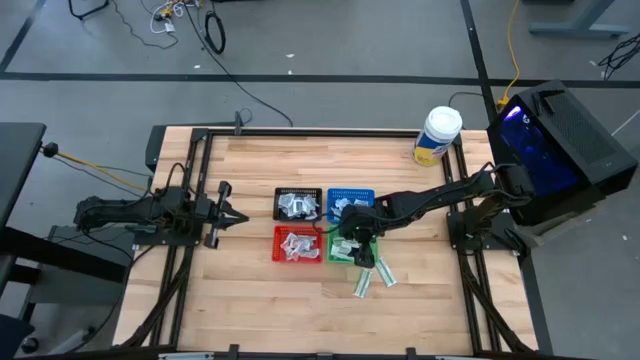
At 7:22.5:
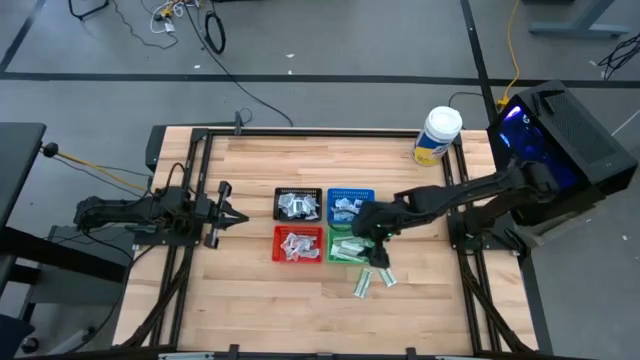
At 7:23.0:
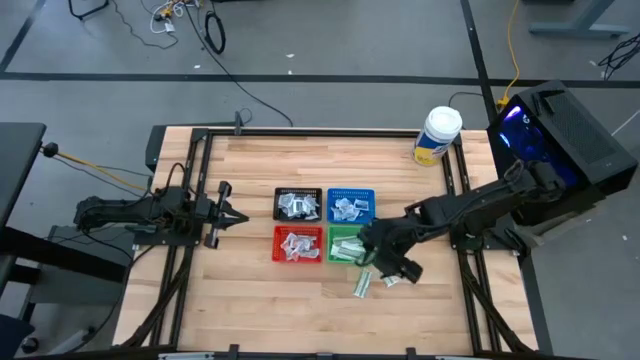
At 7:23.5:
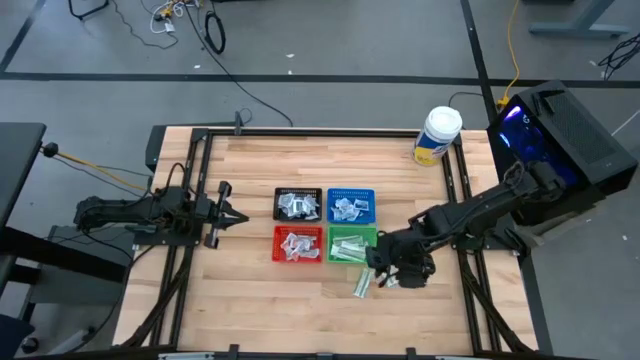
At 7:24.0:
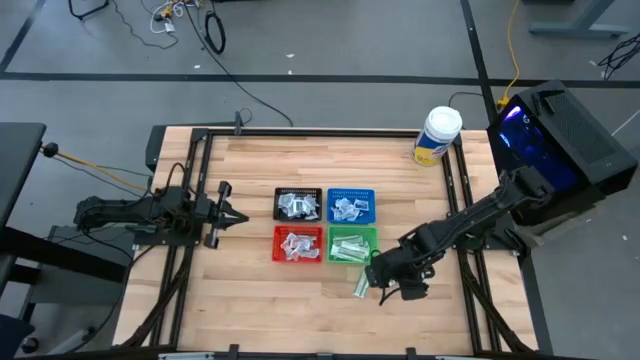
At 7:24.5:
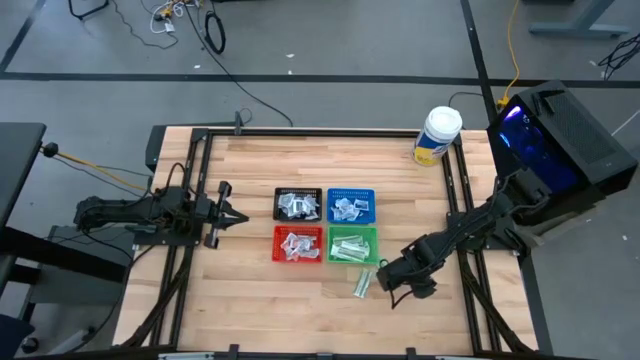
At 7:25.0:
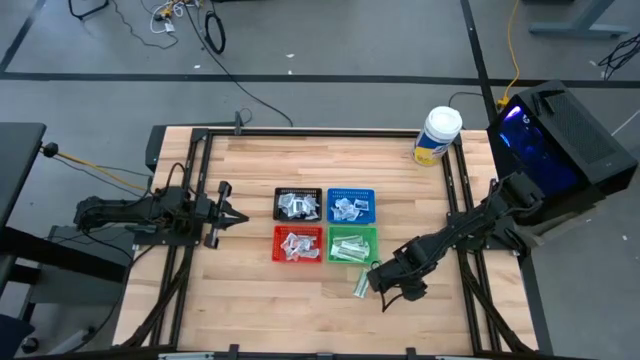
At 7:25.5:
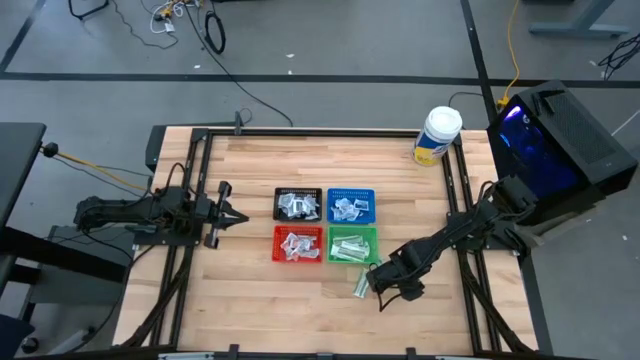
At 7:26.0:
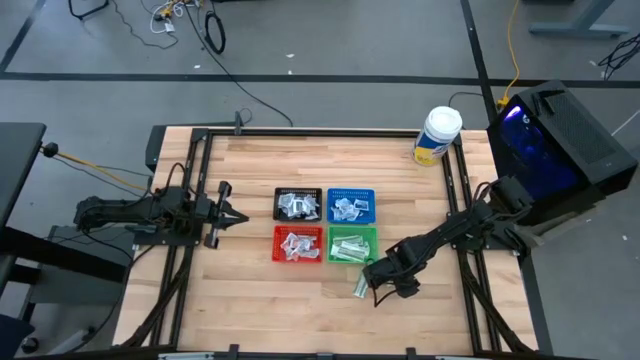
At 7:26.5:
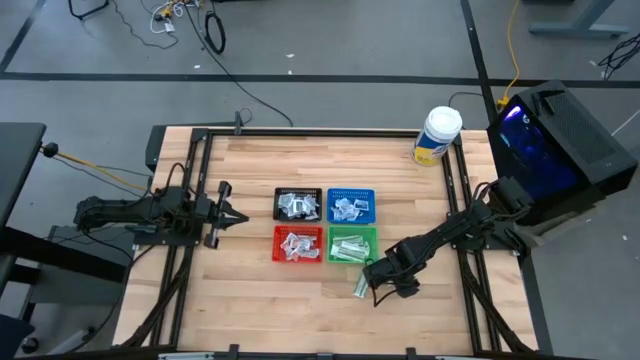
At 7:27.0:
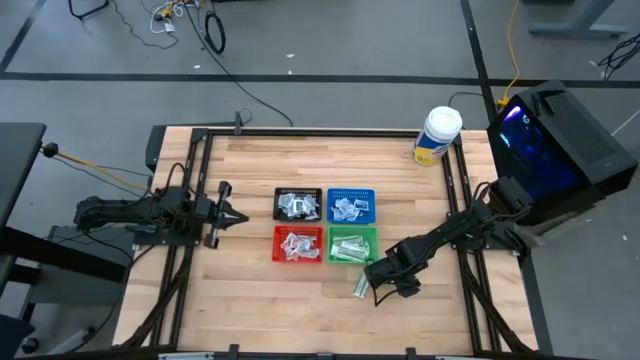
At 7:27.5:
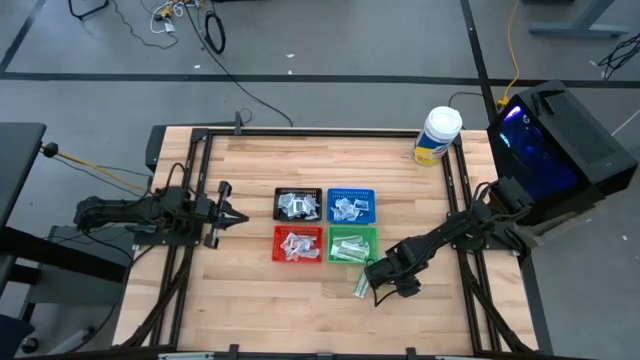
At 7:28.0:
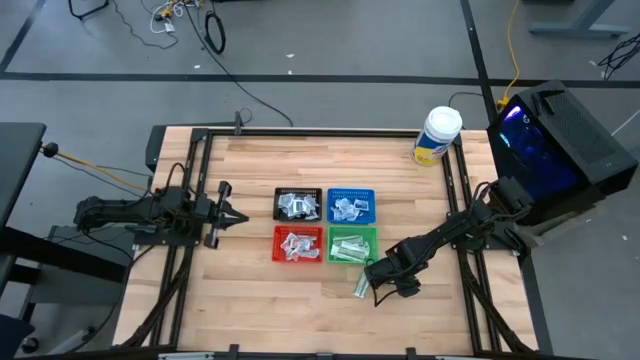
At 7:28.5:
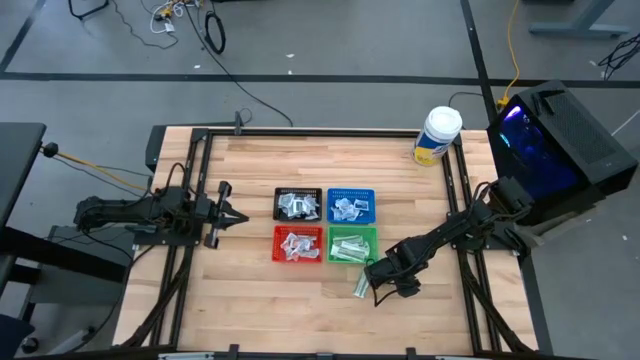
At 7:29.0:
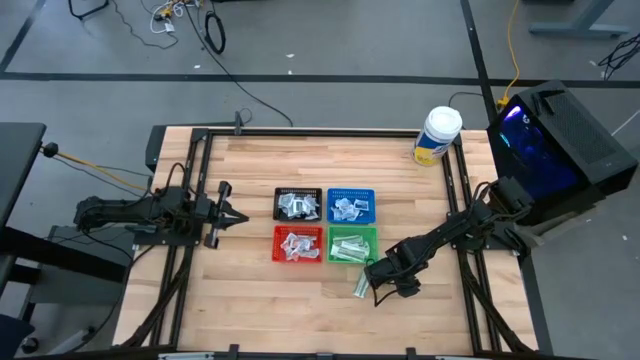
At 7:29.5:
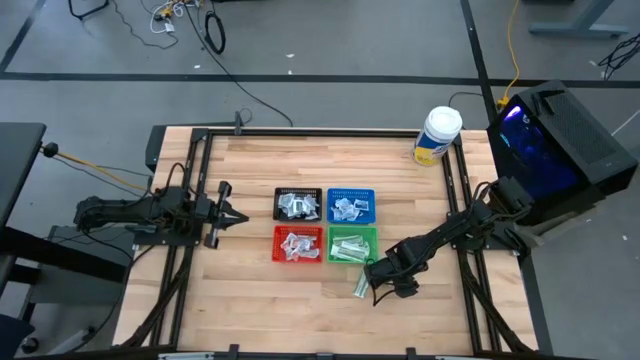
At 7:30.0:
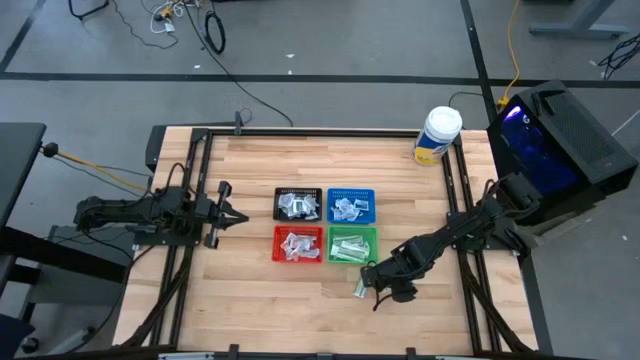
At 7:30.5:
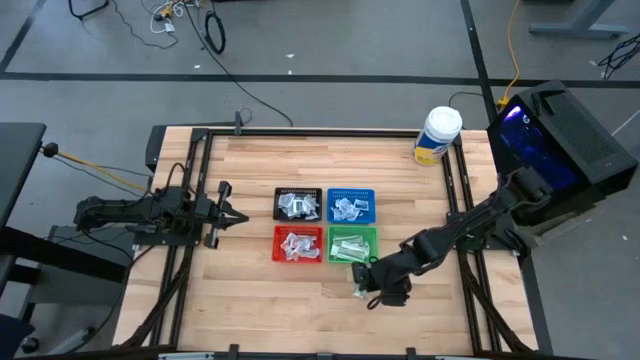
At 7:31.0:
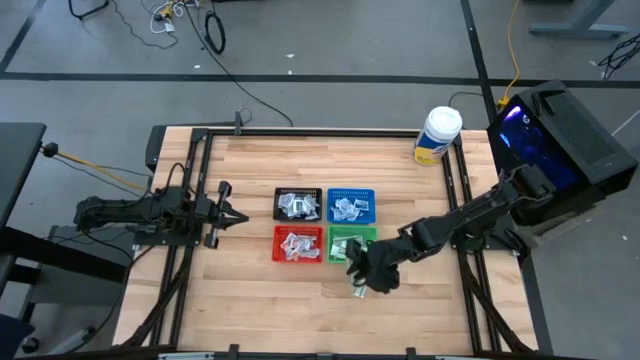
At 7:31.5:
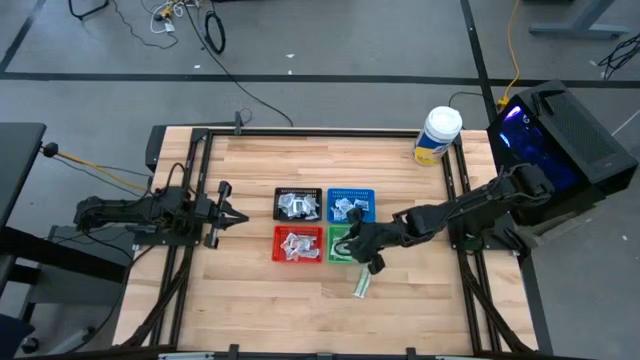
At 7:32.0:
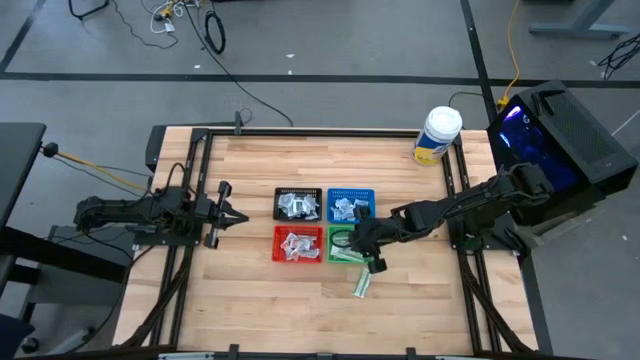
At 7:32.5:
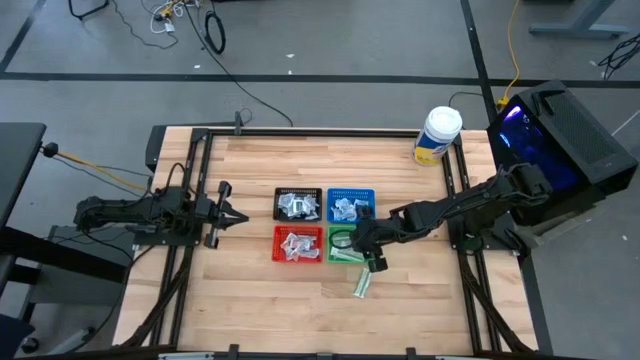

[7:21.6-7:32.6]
Task: Pick & Place First Aid Supplies
Put the right green bandage pack into the green bin

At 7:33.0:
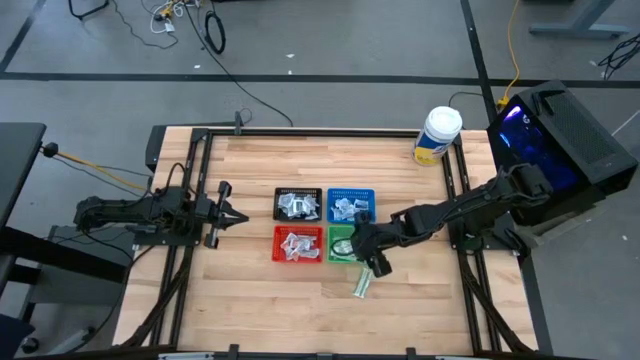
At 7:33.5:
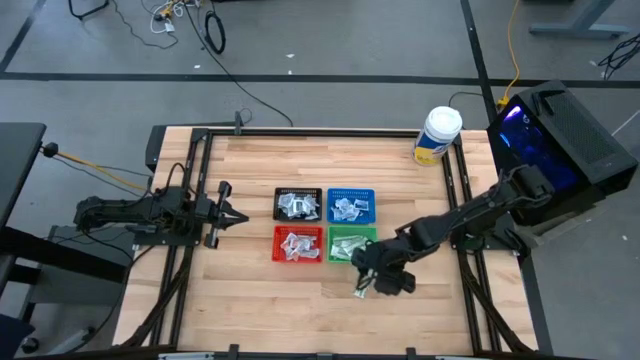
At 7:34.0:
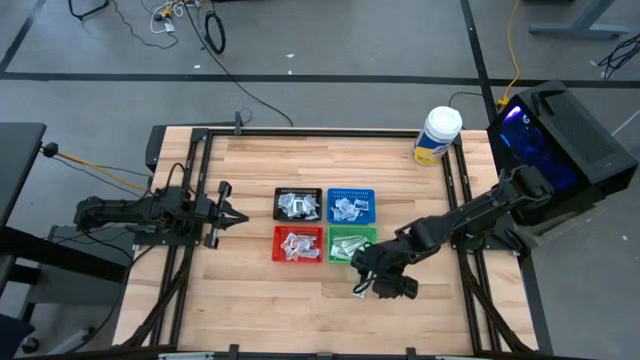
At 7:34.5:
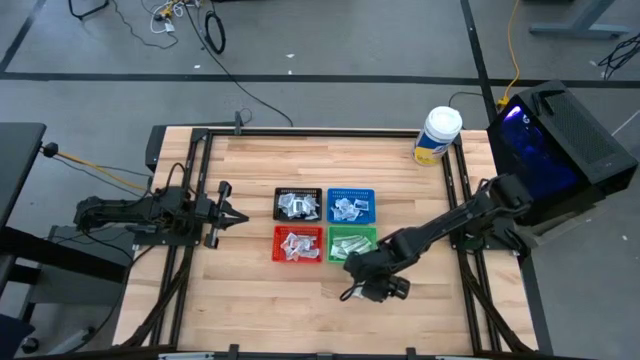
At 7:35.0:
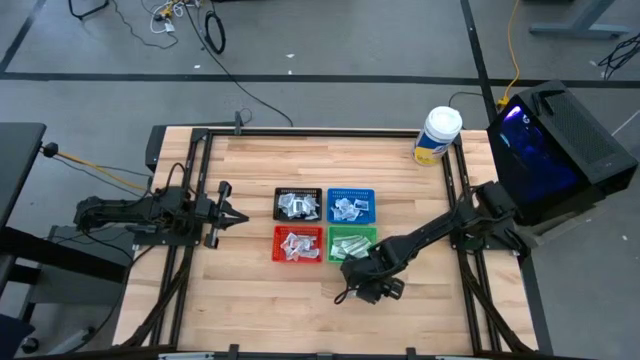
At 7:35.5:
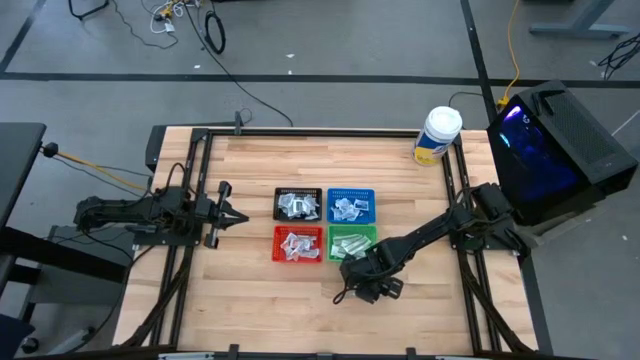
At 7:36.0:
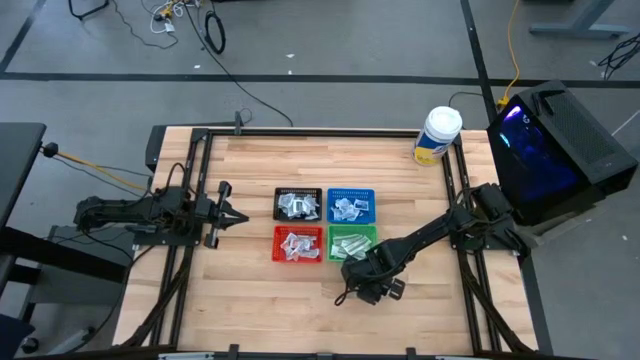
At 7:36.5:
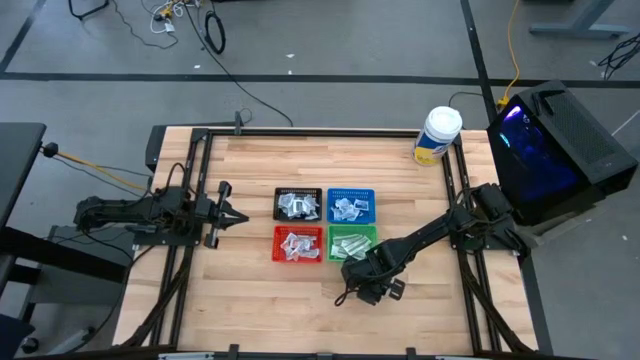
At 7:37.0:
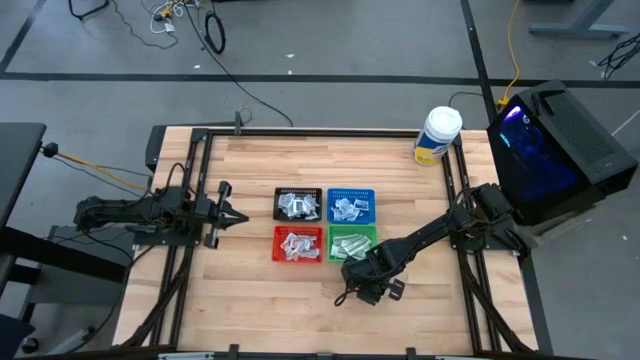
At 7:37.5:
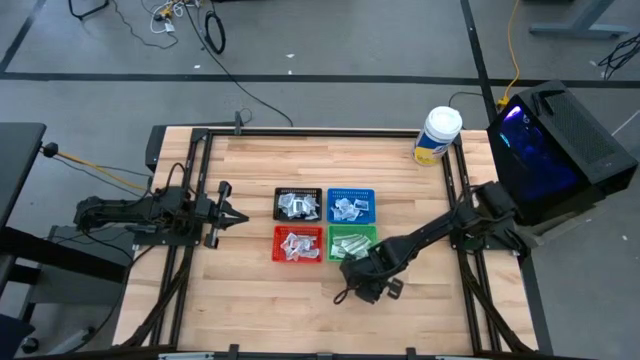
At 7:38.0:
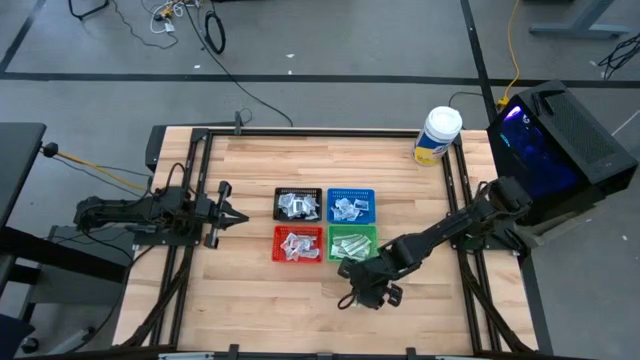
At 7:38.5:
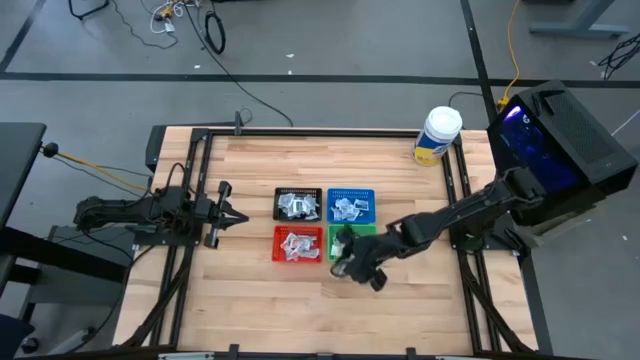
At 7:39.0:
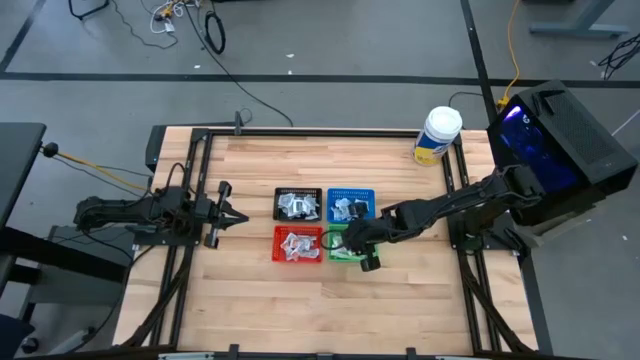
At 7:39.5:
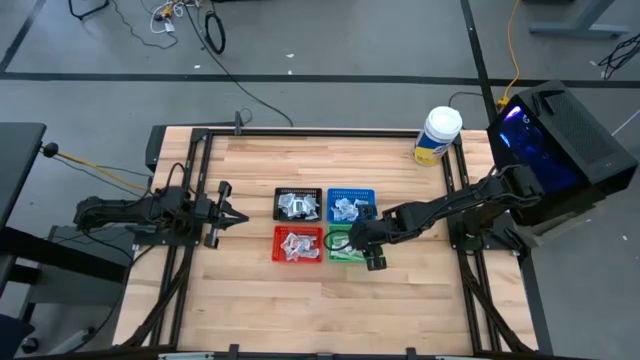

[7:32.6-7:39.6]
Put the green bandage pack into the green bin

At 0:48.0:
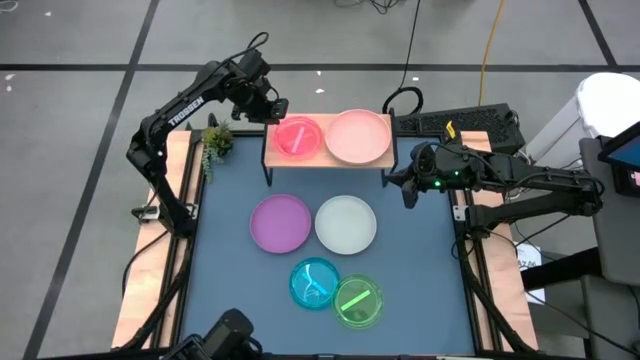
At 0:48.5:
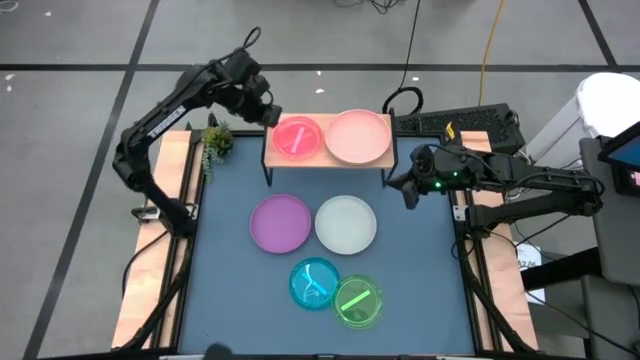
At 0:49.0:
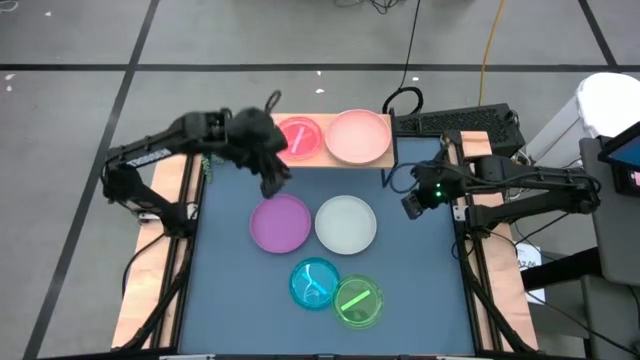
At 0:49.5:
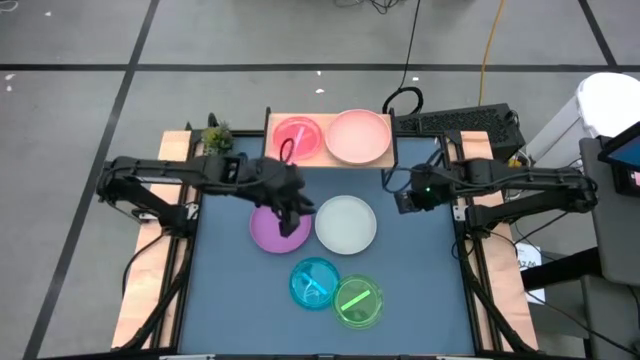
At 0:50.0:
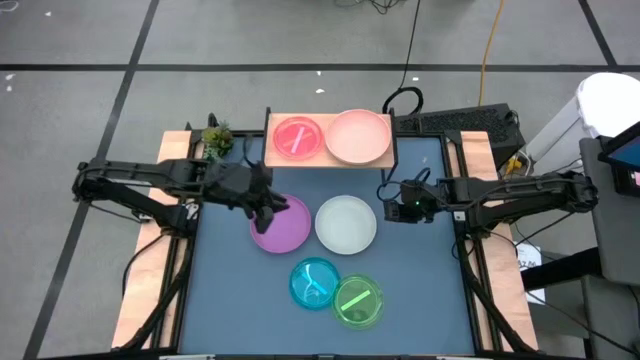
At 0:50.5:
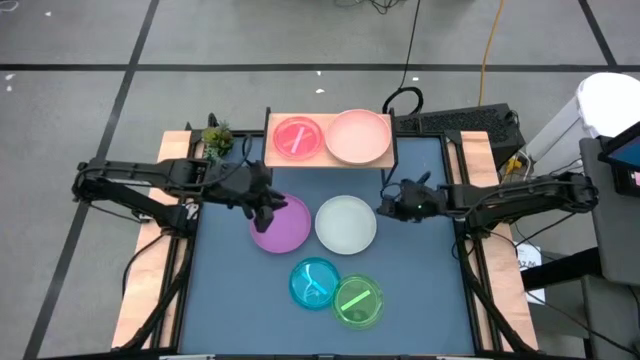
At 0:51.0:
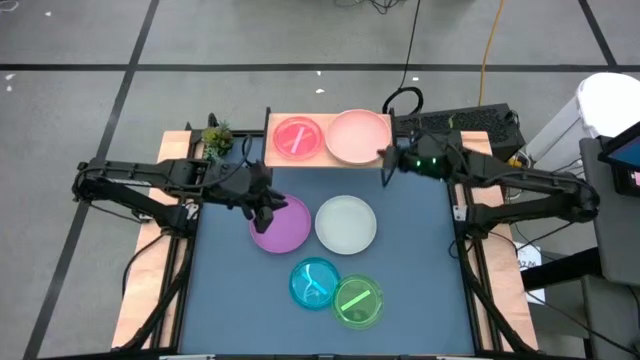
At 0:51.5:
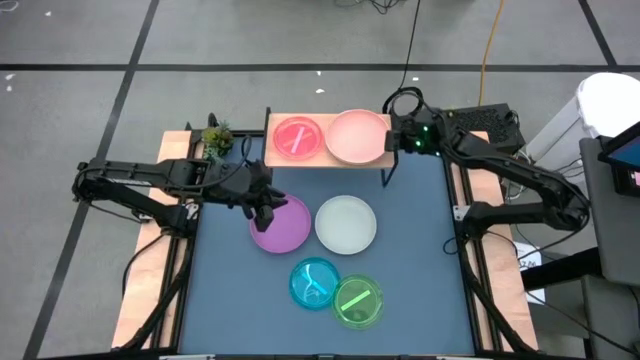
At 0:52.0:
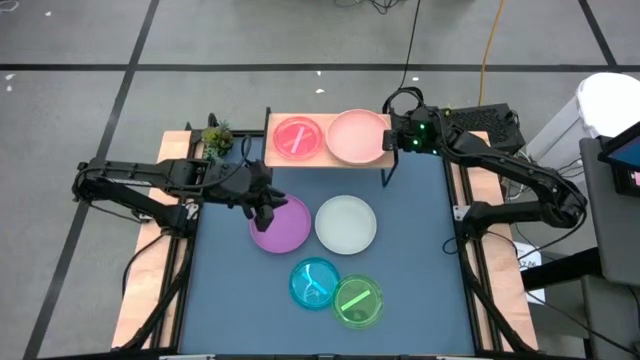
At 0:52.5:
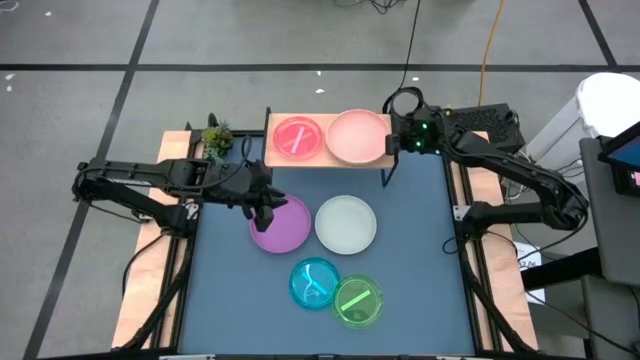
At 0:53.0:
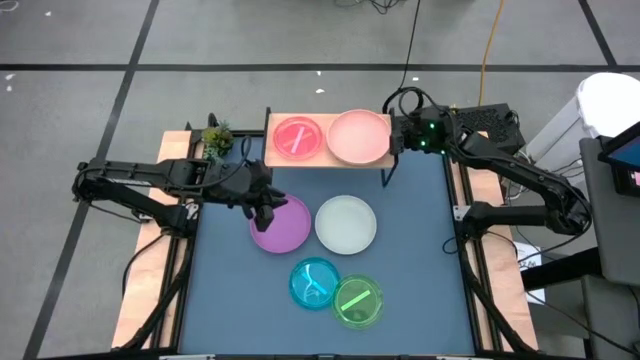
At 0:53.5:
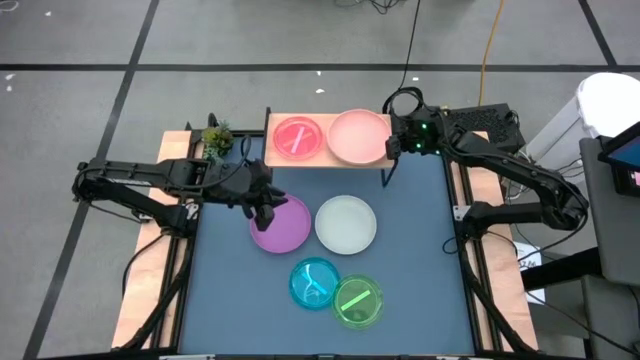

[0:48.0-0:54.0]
Task: Place and stack plates onto a shelf
Adjust the light pink plate
